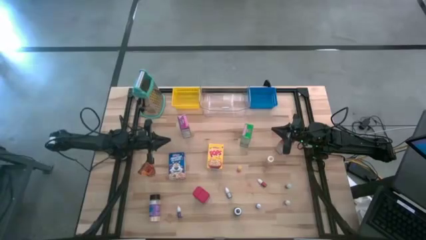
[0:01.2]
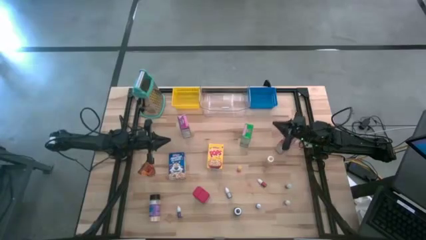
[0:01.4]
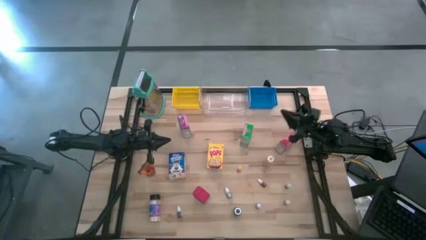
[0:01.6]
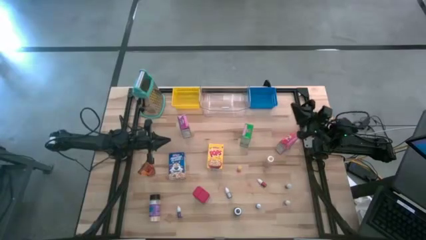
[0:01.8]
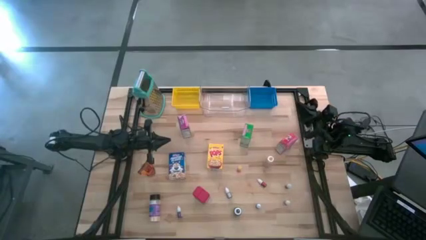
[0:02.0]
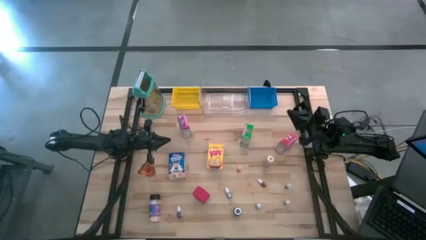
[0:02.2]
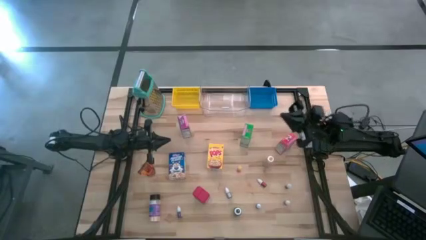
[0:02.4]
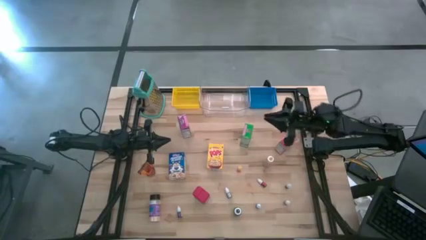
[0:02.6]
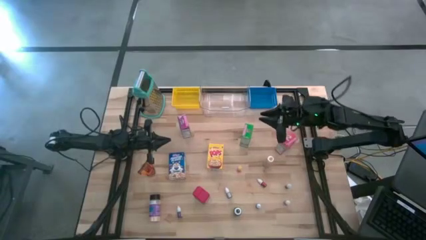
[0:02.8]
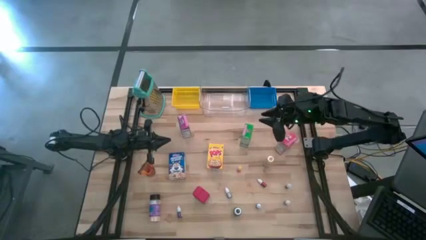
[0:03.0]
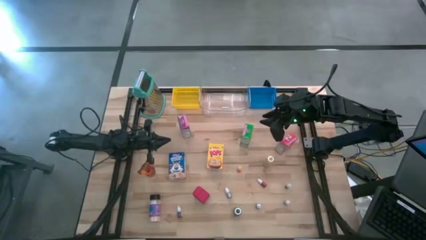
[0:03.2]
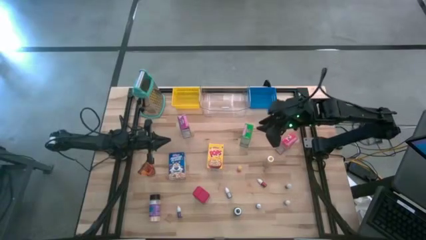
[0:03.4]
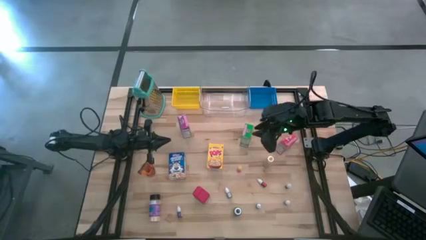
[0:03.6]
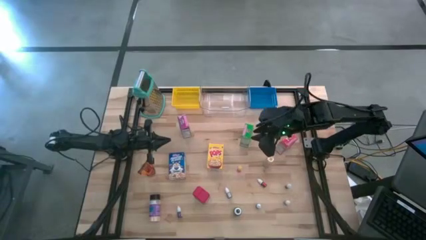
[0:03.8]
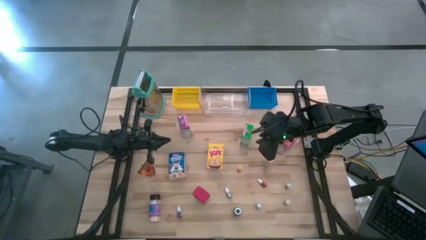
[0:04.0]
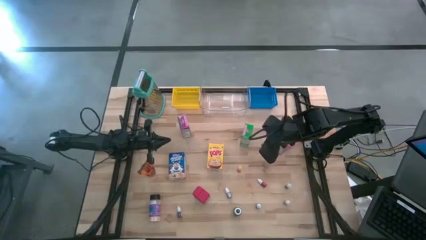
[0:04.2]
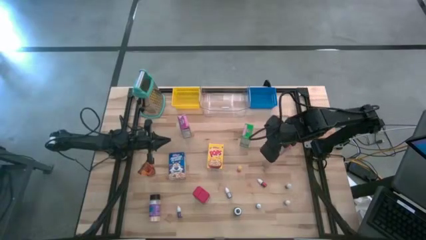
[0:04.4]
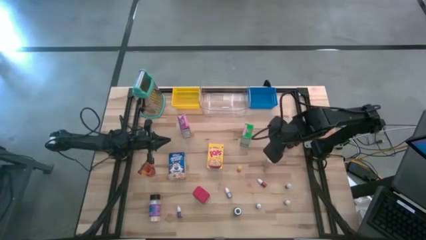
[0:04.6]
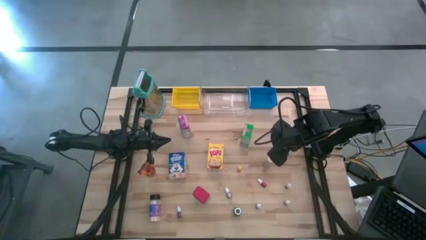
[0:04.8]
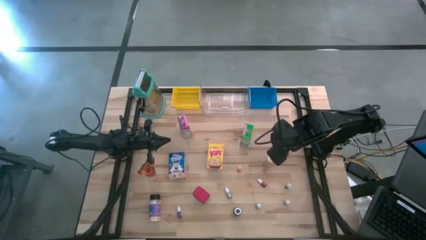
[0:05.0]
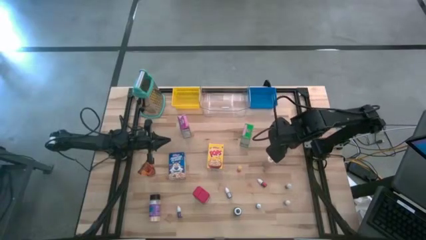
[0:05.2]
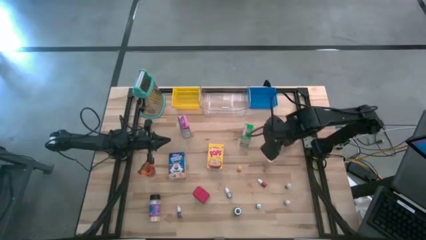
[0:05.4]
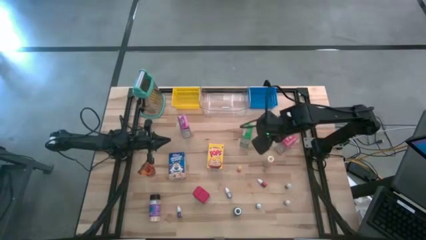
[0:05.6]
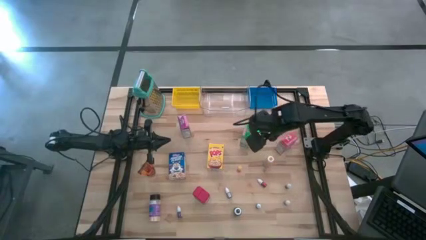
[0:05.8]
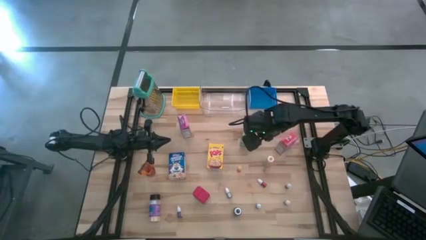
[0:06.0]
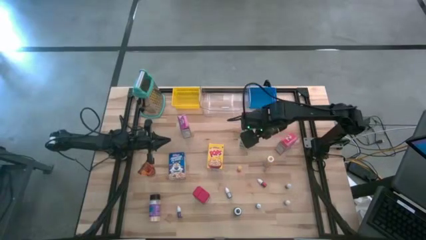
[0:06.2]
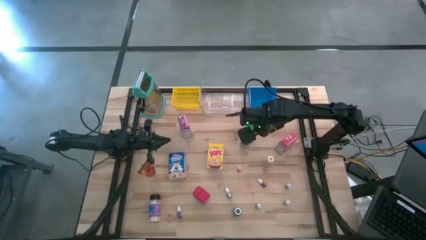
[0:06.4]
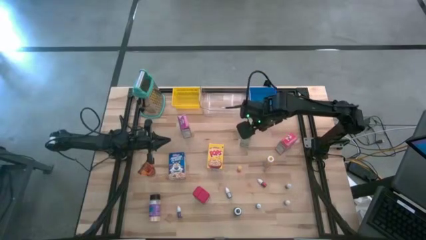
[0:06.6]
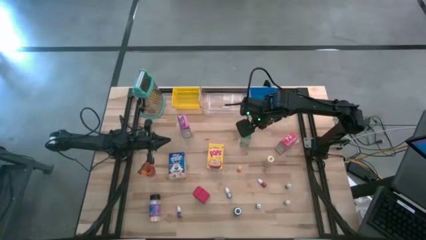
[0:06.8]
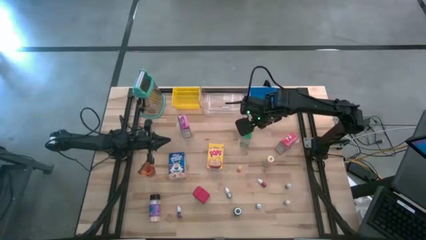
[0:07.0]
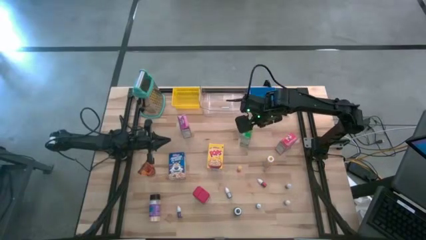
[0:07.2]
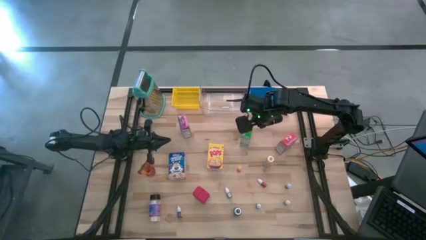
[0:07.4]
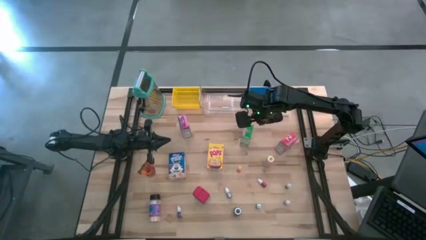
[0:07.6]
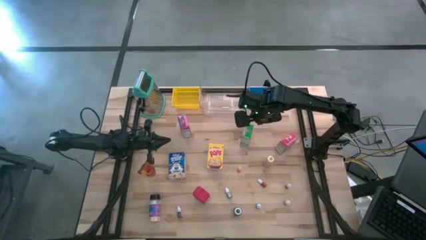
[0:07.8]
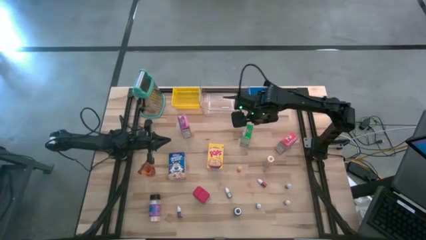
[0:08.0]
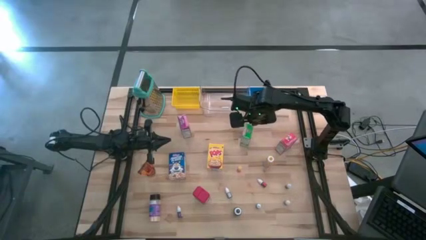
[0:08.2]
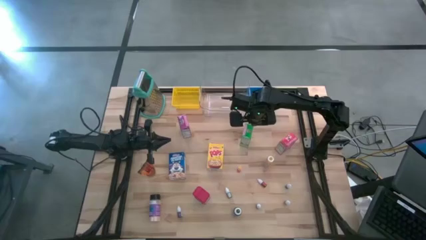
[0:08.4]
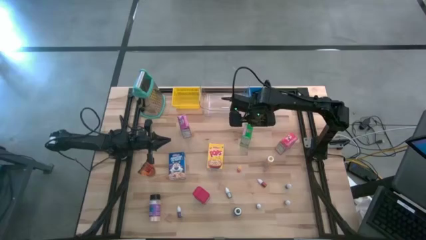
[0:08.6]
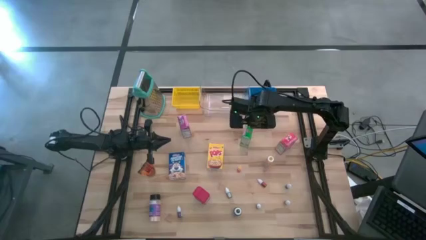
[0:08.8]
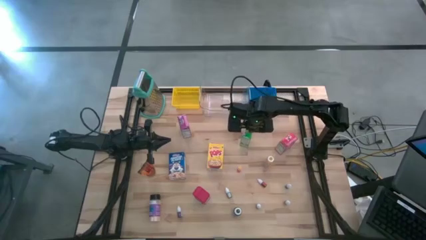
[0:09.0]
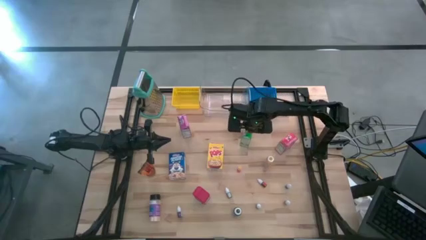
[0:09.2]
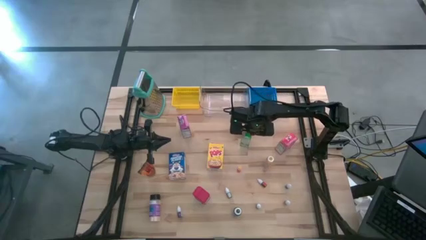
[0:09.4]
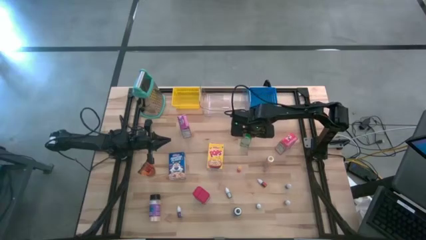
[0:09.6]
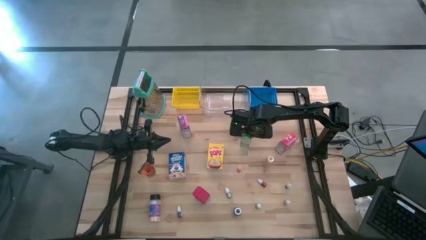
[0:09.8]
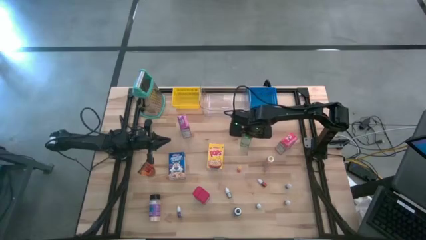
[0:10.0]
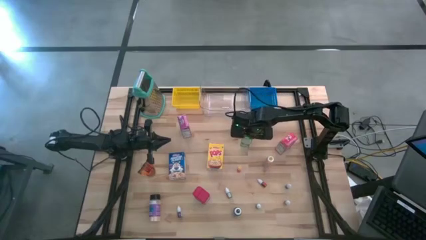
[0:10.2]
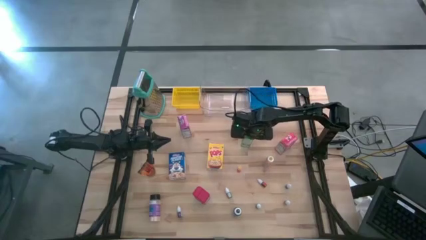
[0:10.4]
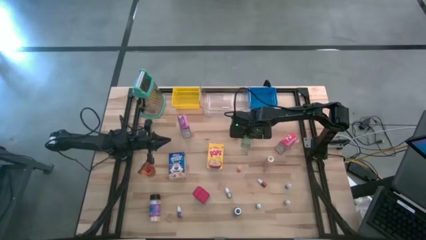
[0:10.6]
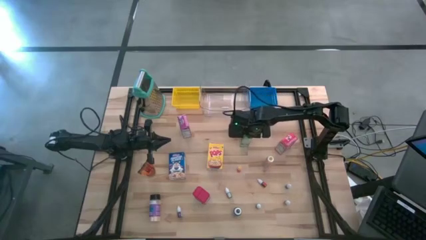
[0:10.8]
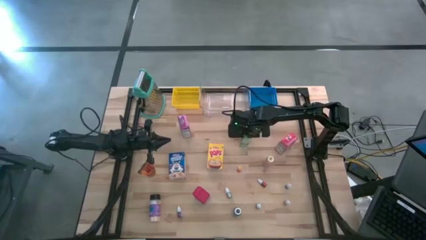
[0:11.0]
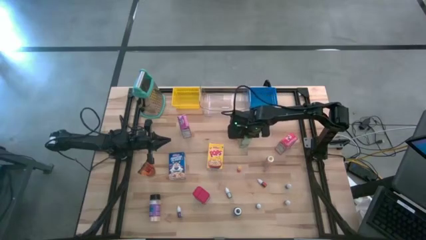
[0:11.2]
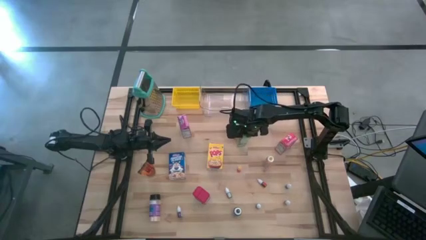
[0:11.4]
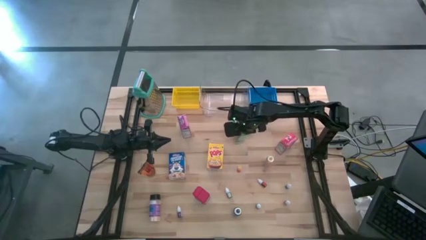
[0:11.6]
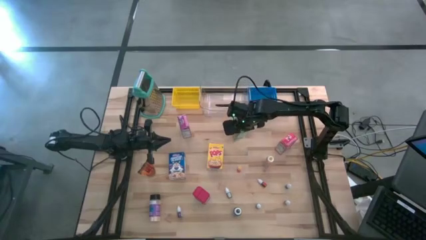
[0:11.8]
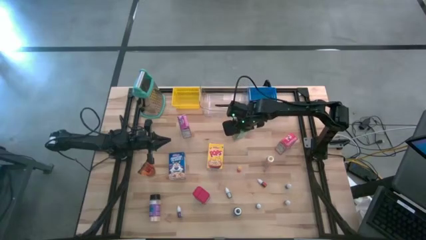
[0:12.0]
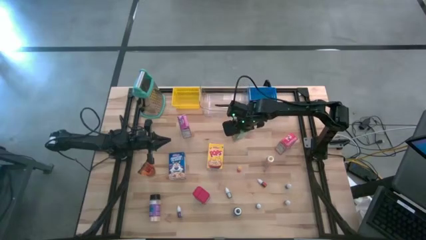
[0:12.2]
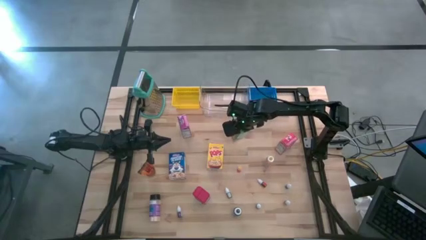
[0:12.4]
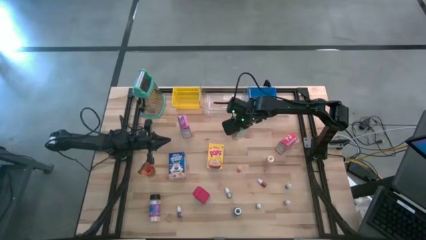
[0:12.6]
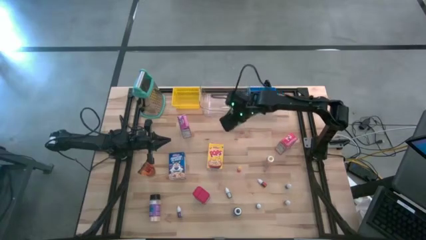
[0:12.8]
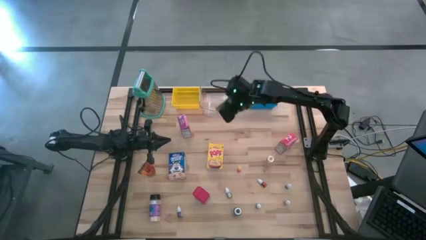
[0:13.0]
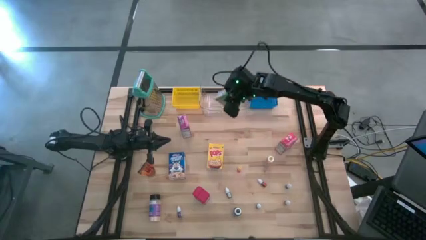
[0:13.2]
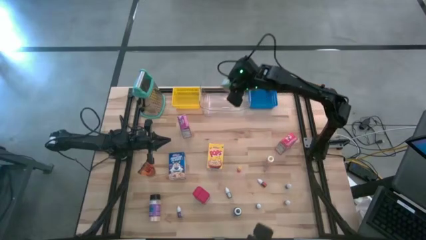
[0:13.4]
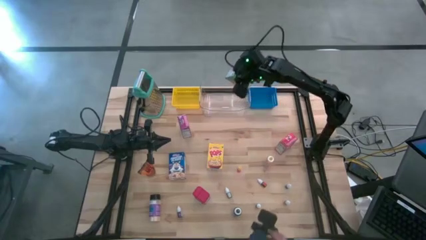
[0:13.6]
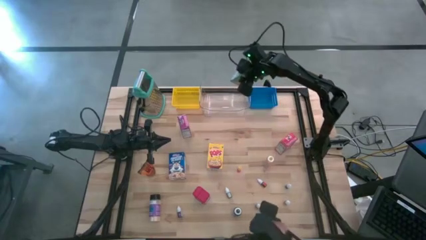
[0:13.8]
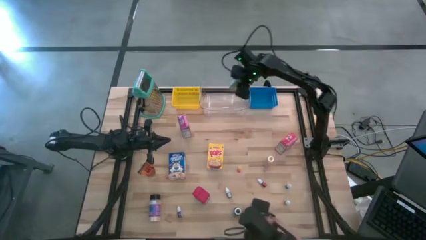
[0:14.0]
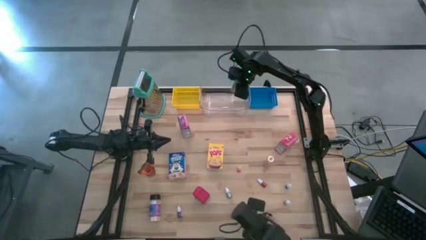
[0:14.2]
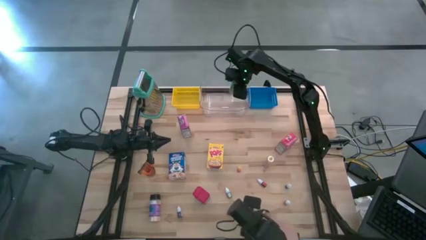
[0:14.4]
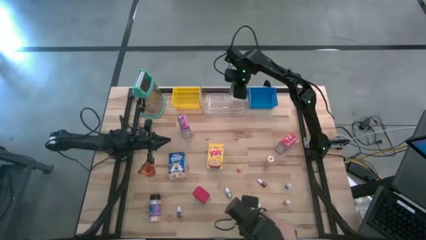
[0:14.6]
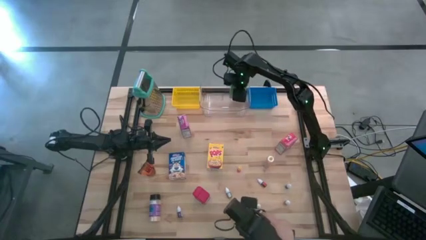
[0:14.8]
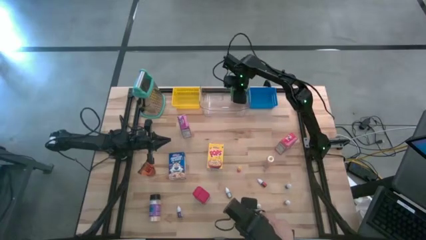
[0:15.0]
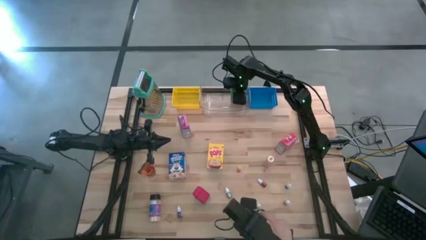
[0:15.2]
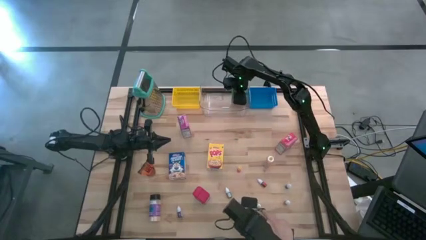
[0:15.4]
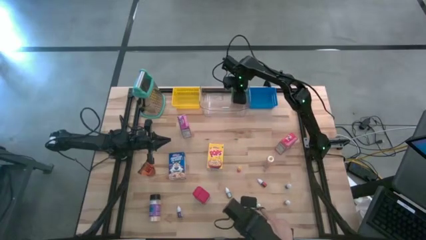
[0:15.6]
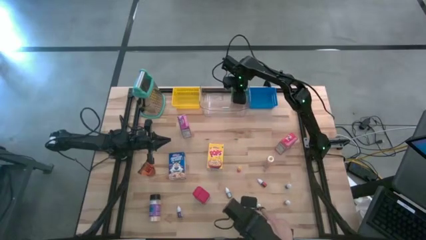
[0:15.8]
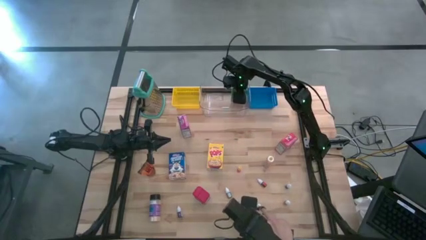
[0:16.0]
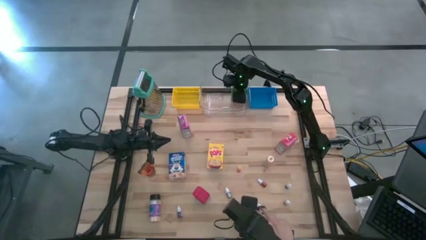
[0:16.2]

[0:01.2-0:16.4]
Task: Pick & Place Kitchen Items
Put the green cereal box into the transparent bin
